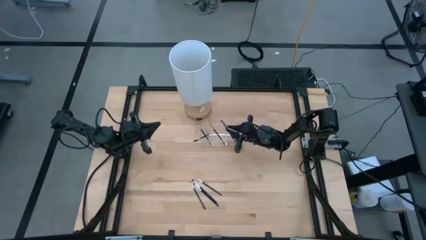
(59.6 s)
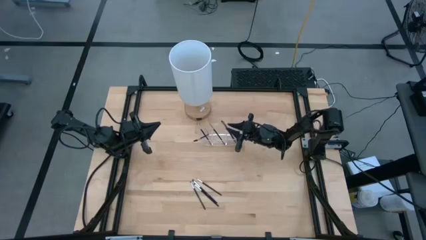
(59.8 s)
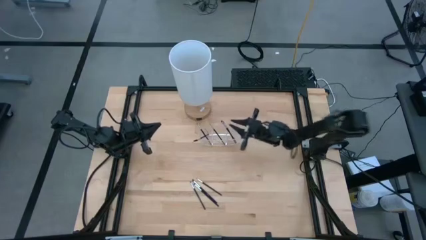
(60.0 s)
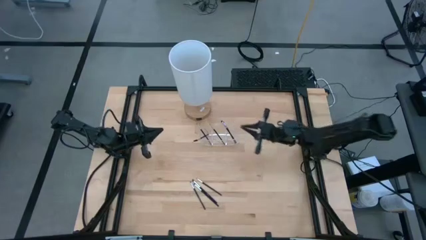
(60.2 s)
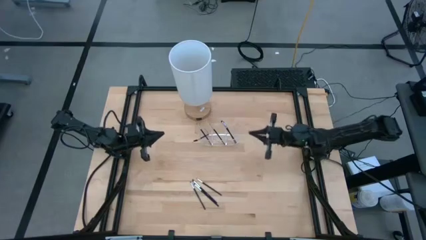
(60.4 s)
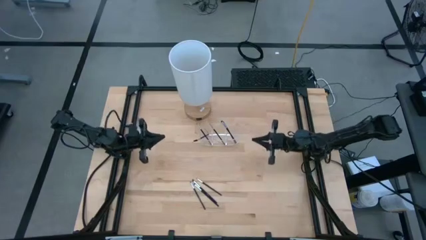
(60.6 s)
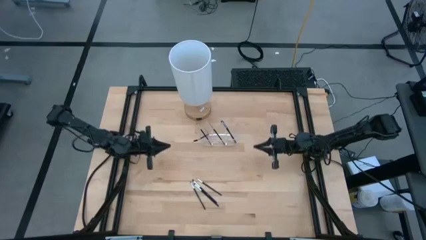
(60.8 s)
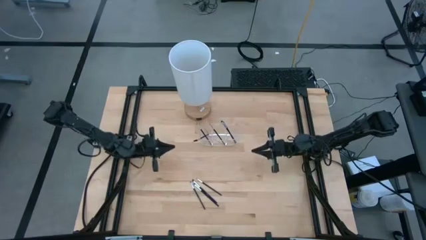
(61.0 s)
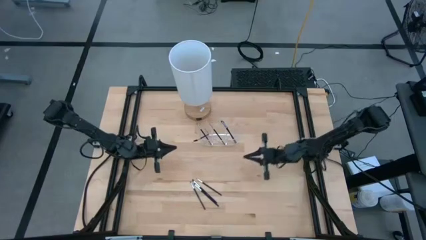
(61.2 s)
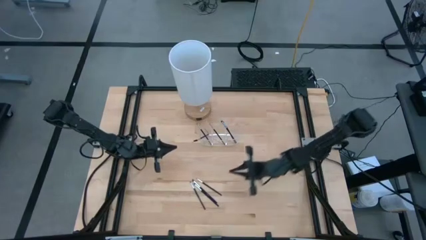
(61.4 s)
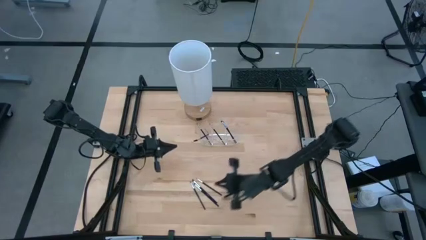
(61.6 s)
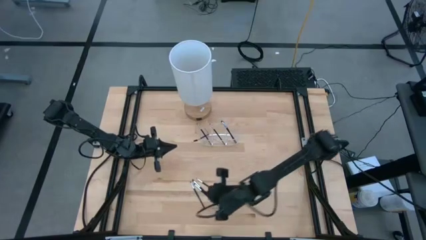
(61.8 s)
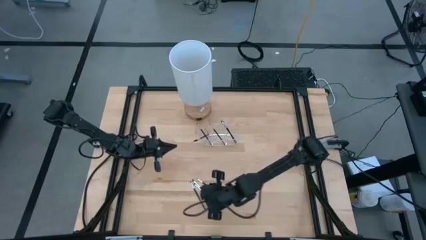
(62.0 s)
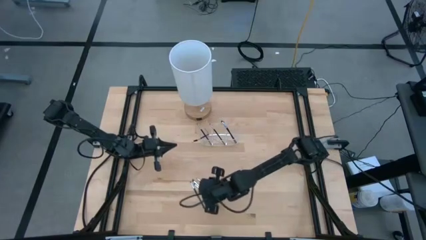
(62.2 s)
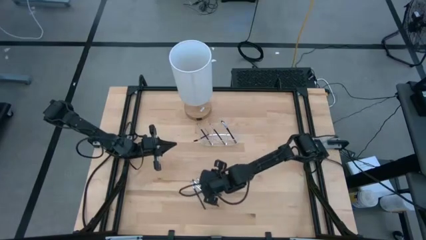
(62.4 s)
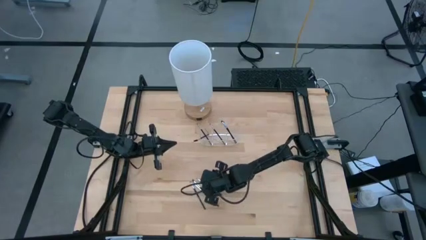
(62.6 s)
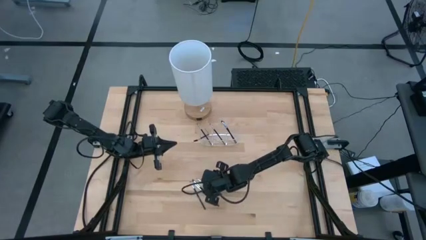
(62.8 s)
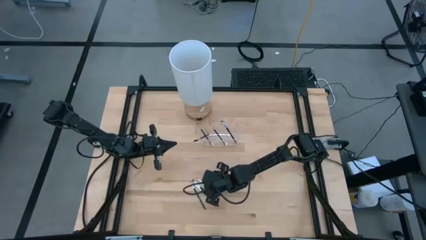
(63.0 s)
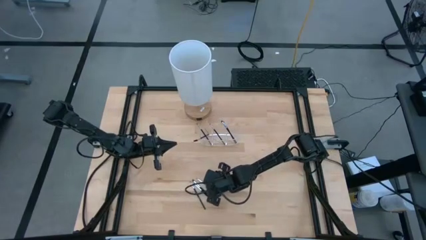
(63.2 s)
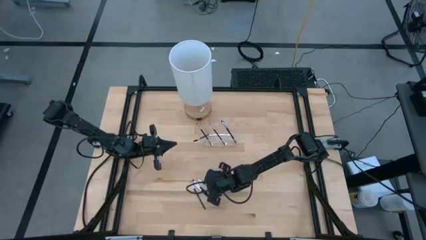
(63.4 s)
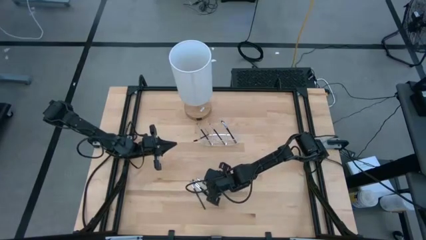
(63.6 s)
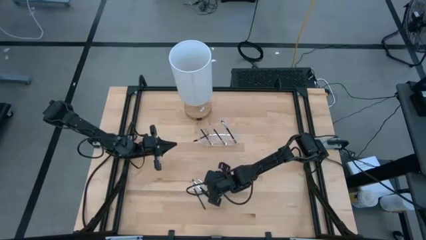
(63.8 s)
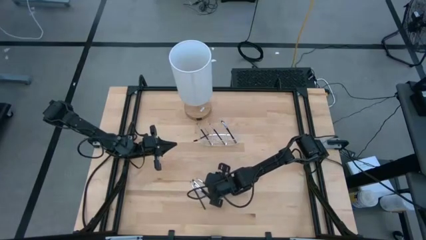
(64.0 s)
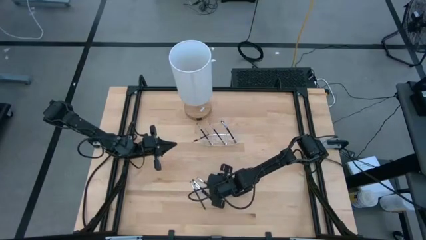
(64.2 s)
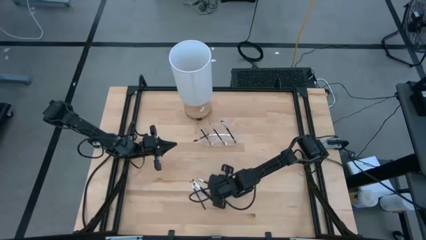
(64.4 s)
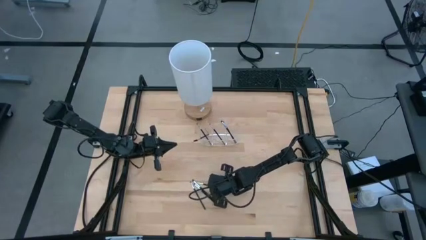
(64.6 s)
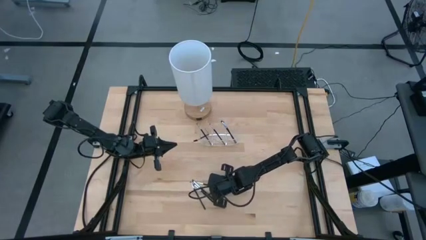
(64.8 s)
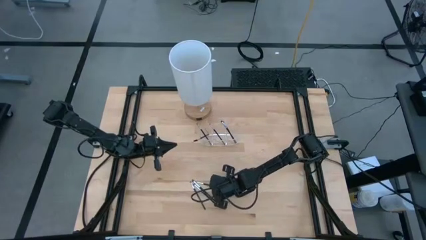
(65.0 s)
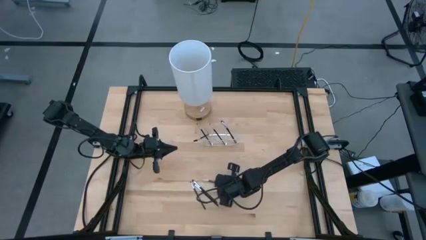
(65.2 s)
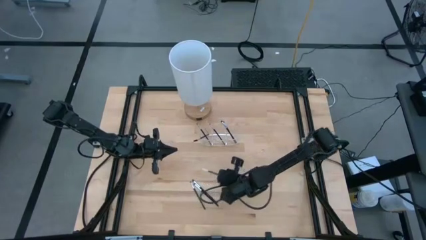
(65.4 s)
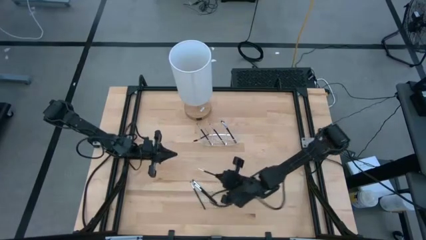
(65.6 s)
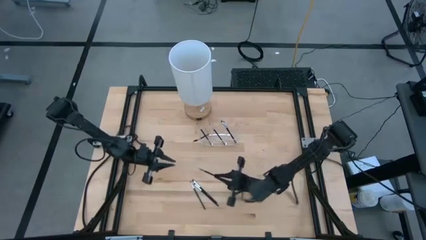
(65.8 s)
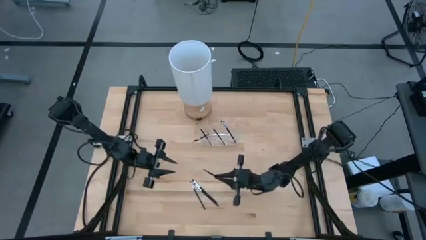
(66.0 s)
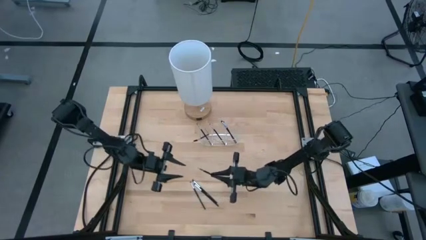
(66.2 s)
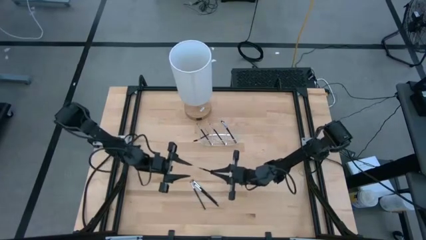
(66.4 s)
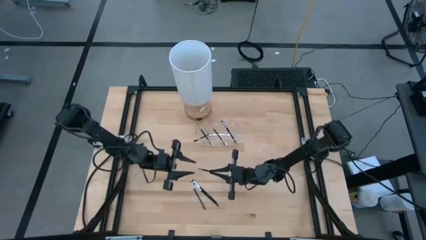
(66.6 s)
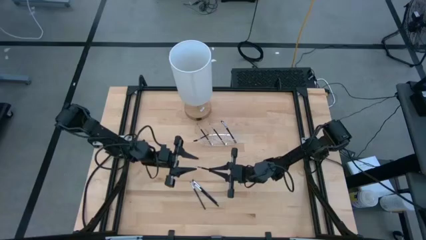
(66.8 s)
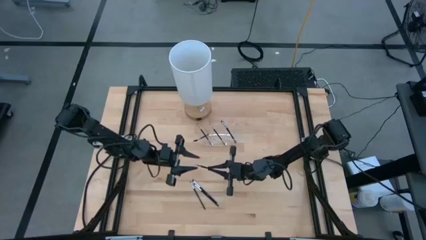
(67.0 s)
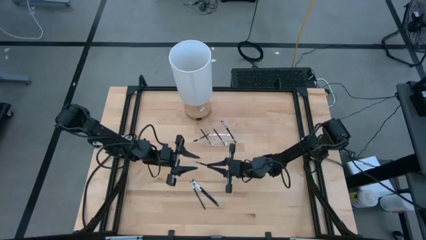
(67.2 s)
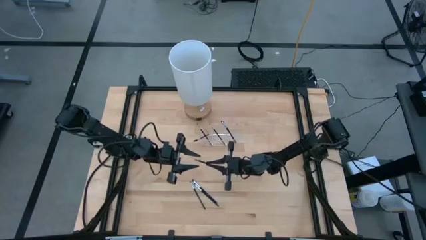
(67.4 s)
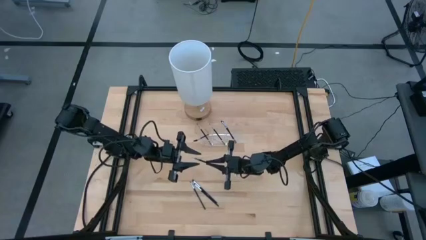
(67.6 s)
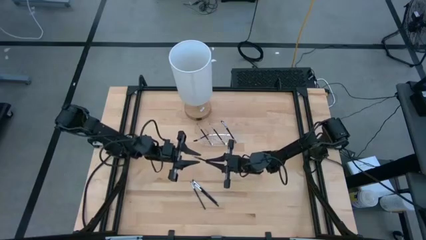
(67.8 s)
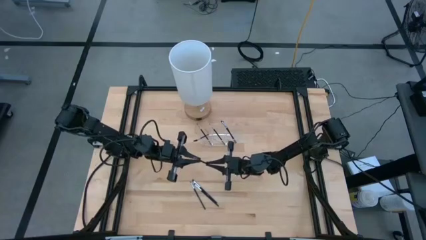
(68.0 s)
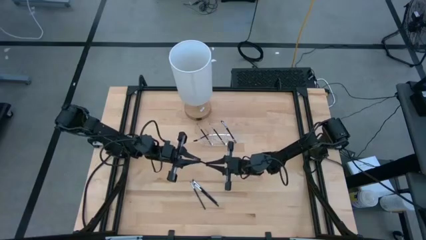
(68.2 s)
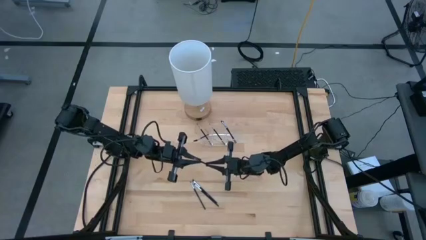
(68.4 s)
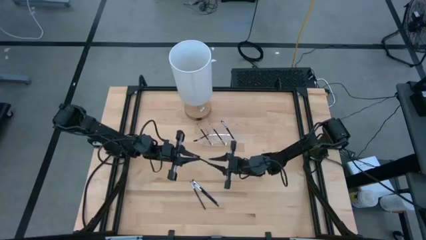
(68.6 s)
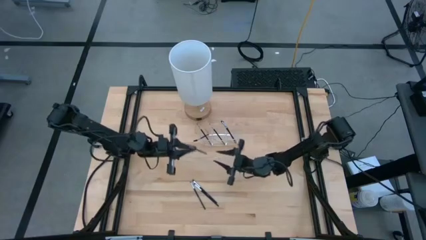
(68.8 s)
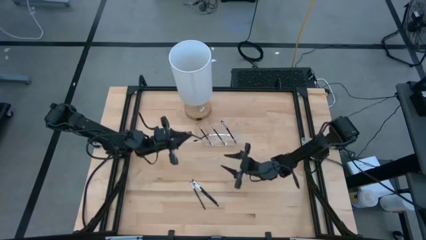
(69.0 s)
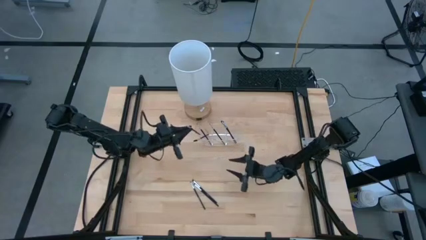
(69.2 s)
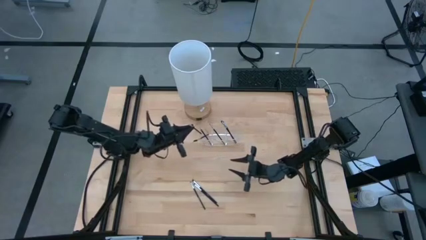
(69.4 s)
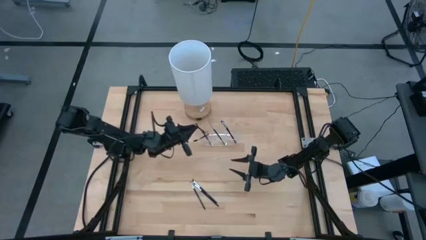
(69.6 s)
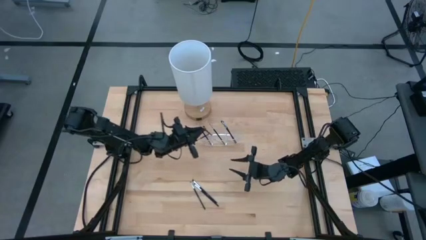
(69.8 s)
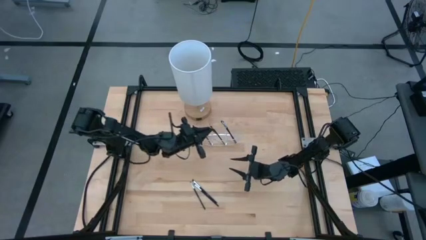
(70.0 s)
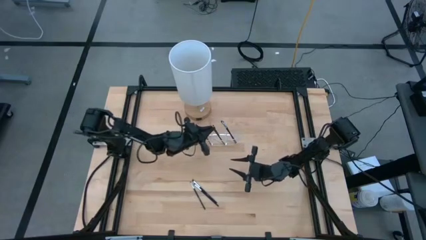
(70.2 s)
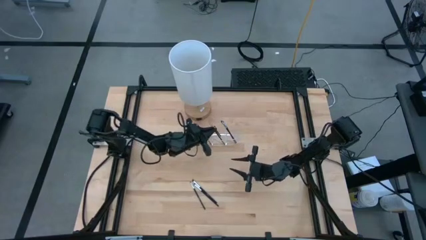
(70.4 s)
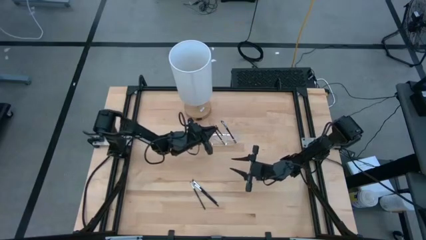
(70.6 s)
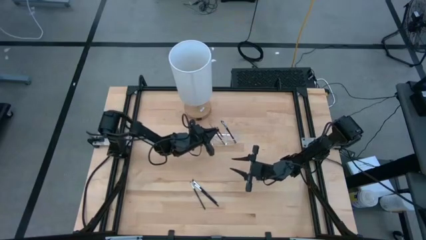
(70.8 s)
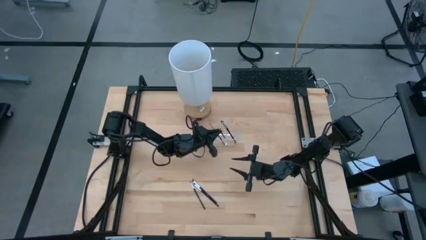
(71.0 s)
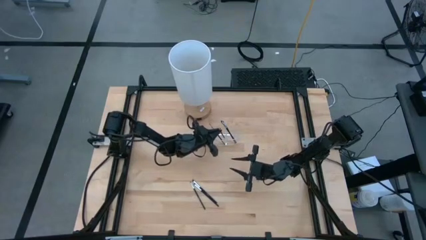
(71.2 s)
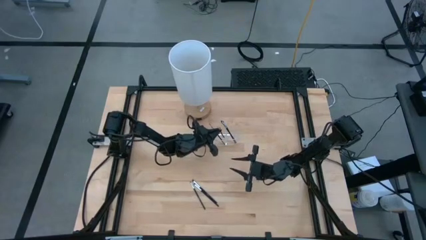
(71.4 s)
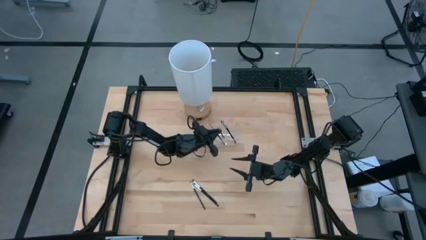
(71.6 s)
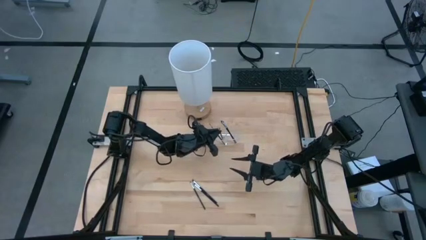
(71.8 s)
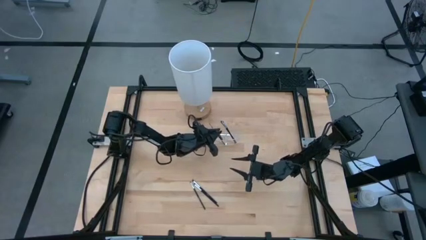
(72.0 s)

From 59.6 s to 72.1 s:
Task: Pick & Place Makeup Supplies
Put the makeup brush into the transparent organizer
